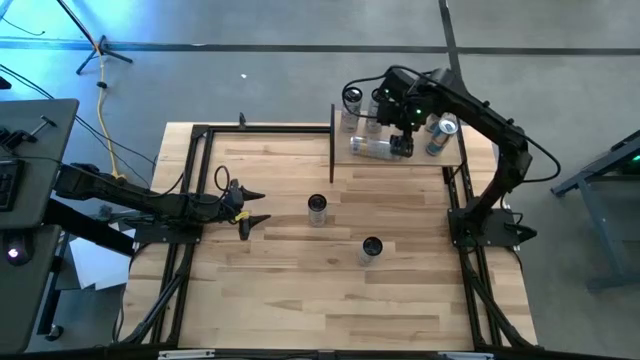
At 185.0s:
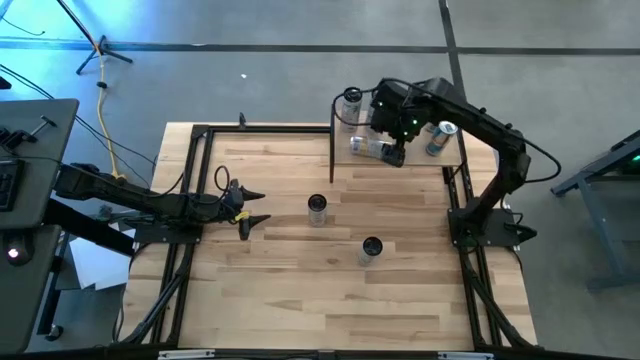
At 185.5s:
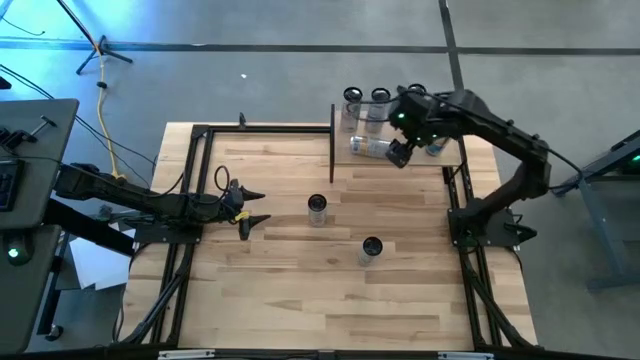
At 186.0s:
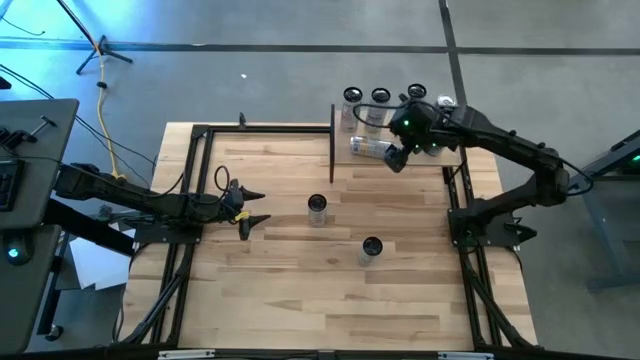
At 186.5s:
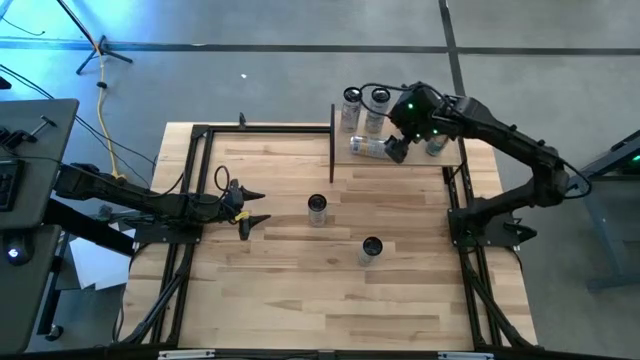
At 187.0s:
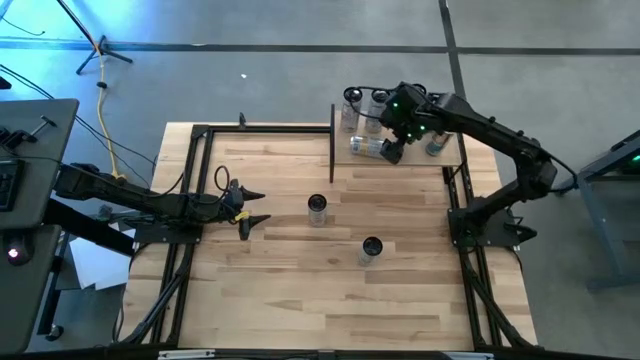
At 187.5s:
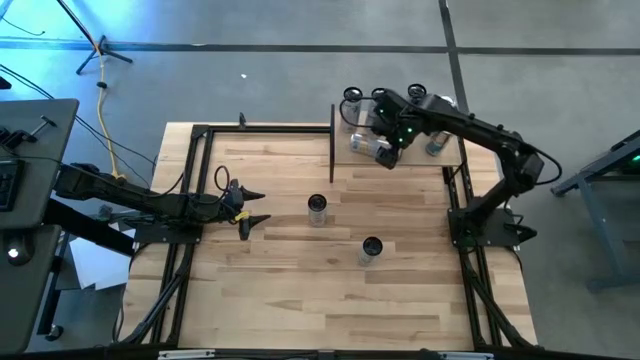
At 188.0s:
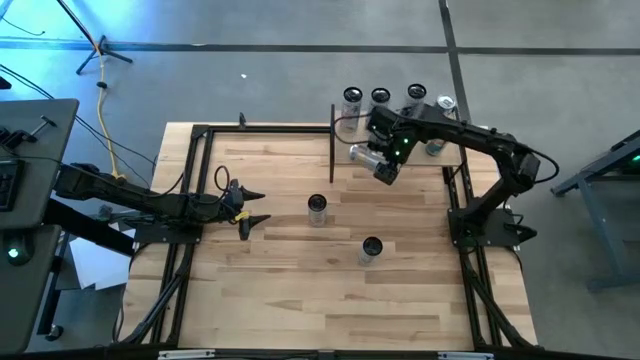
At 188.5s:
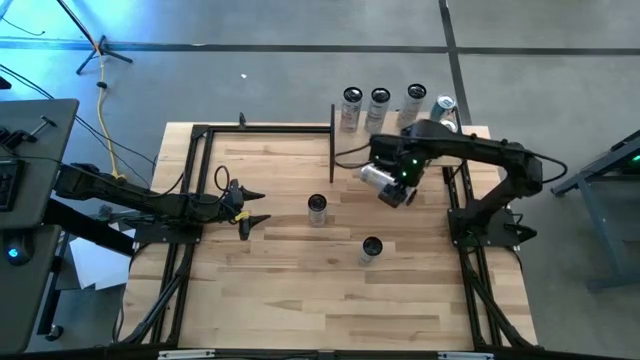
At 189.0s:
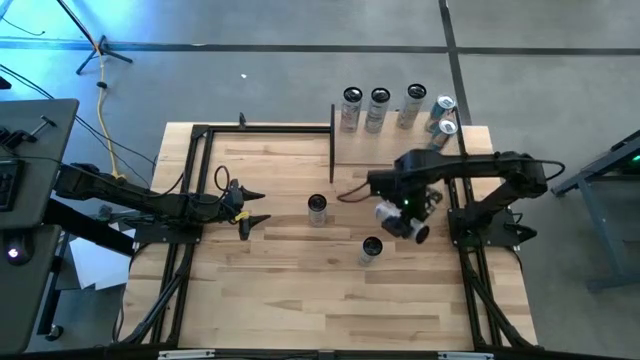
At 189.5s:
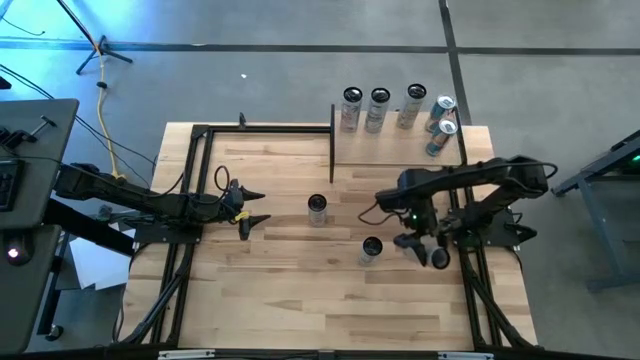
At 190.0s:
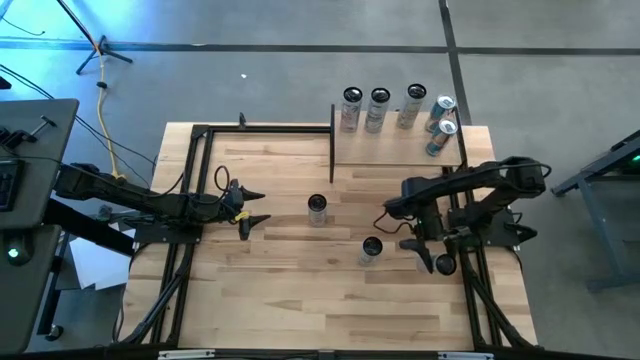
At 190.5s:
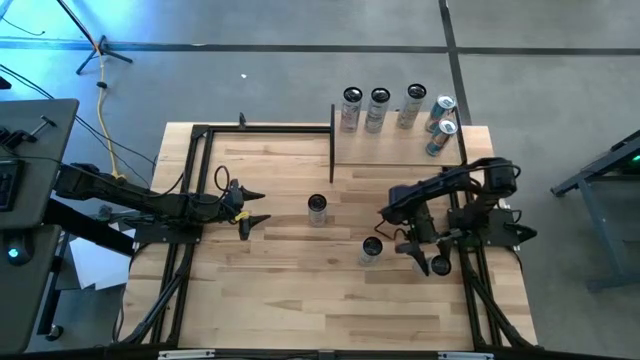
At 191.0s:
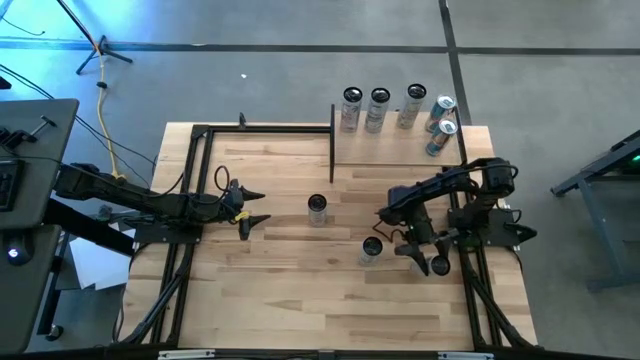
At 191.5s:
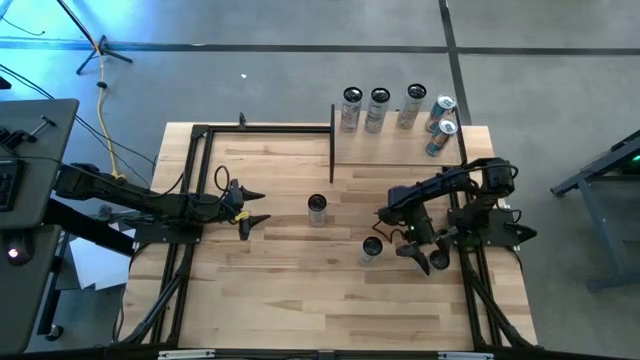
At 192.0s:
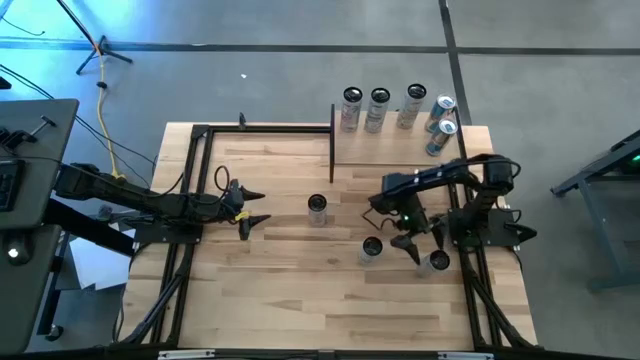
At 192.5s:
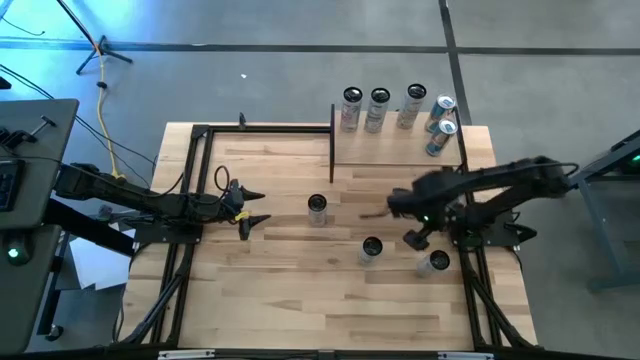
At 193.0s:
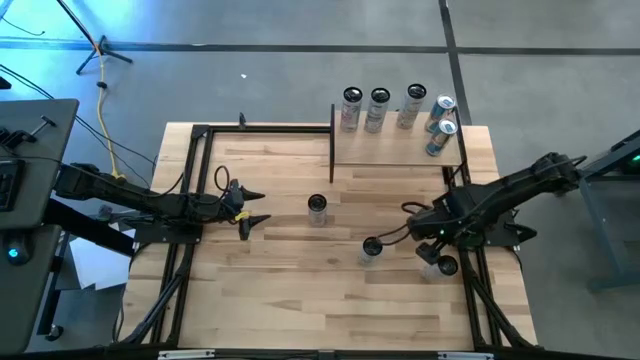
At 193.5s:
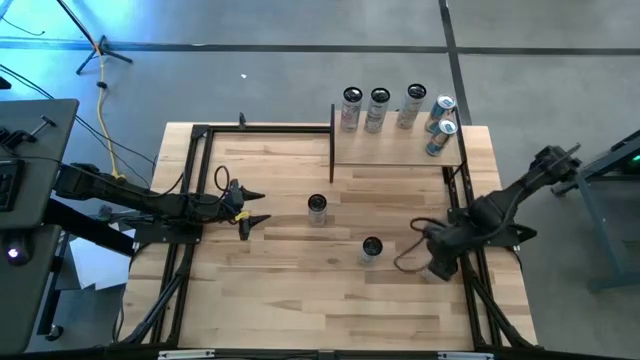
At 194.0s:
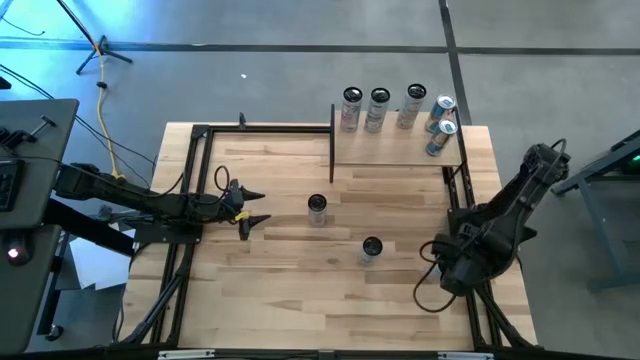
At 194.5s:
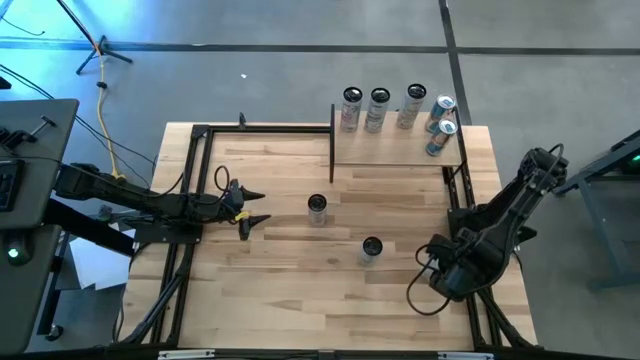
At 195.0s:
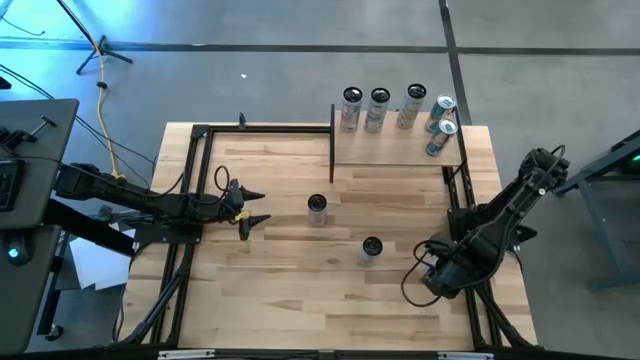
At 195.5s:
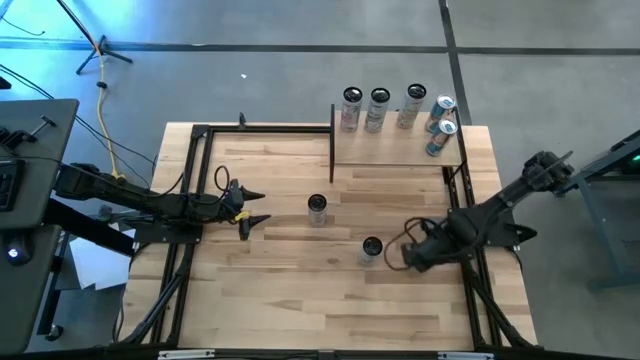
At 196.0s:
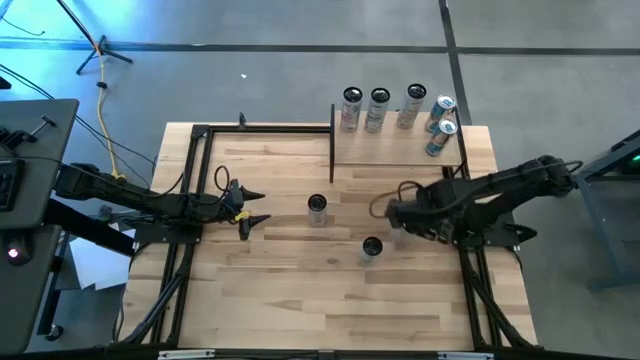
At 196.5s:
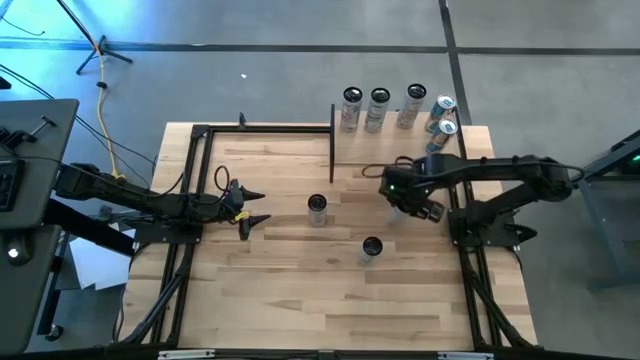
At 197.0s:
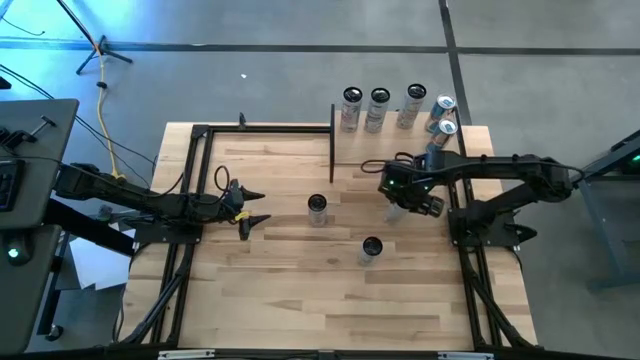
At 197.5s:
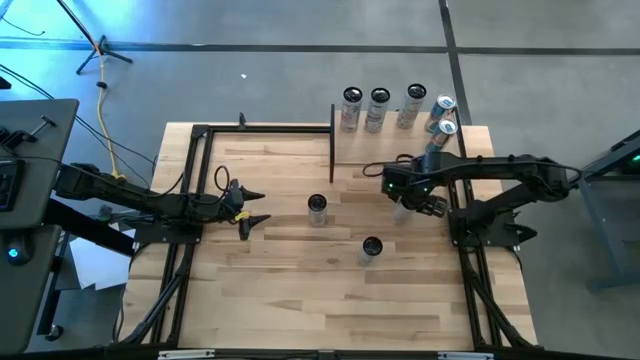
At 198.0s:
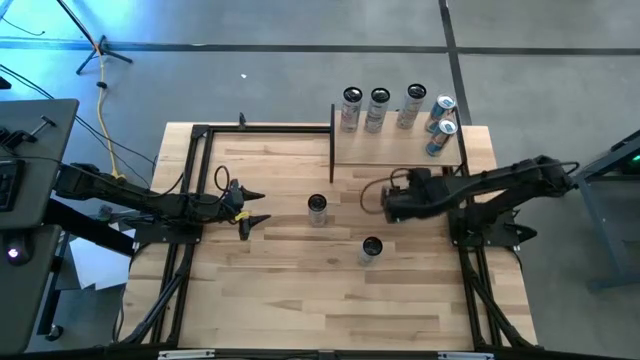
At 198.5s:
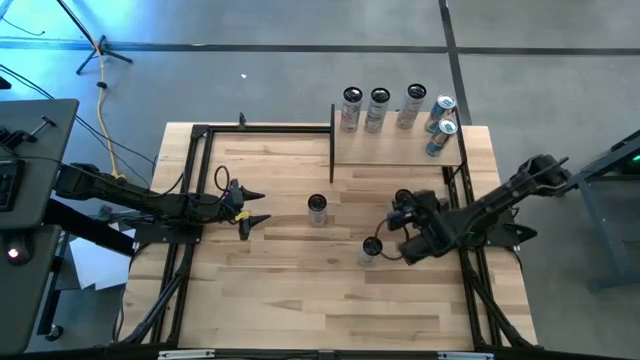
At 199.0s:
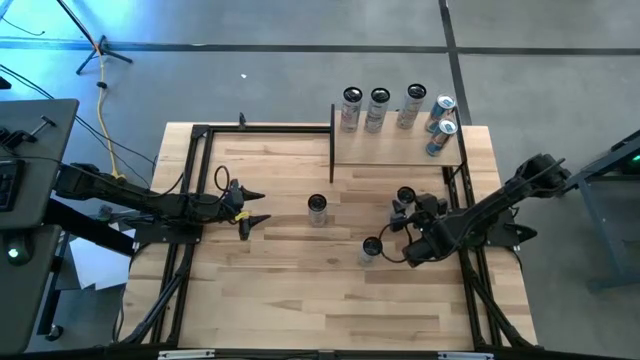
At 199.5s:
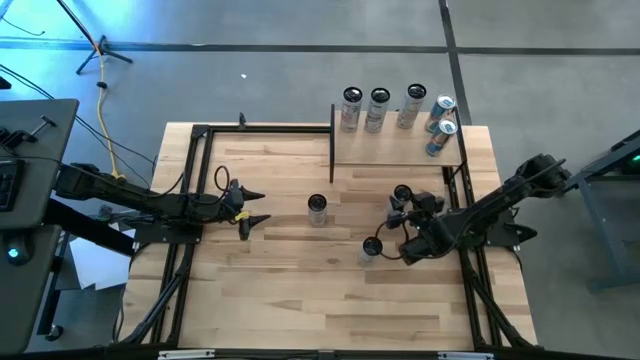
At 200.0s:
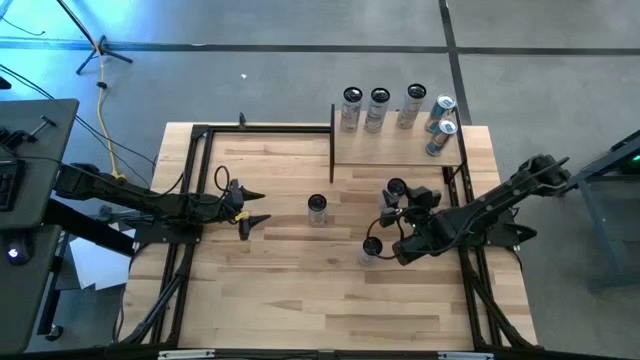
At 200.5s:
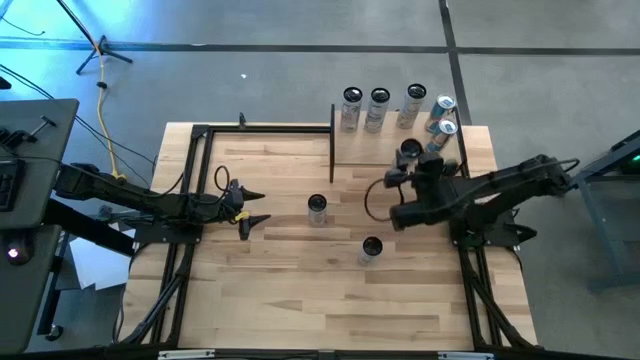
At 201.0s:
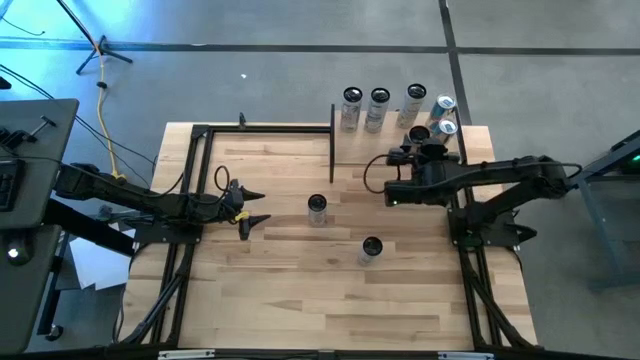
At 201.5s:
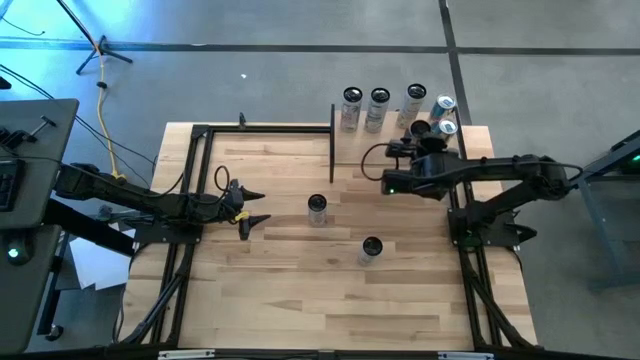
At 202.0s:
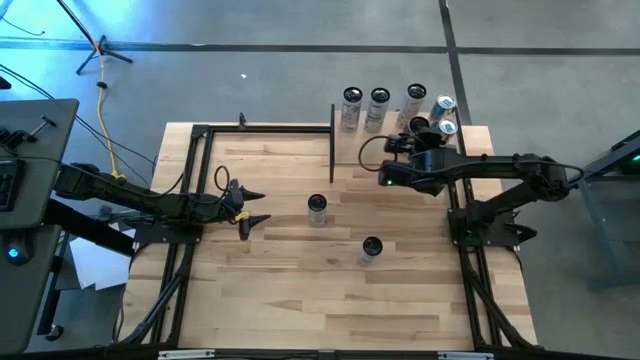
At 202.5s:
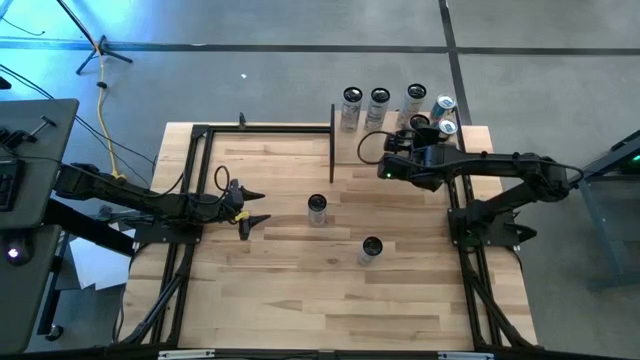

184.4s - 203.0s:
Task: Place canned beverage on shelf
Put the white yellow soda can on the shelf aligned with the white yellow soda can

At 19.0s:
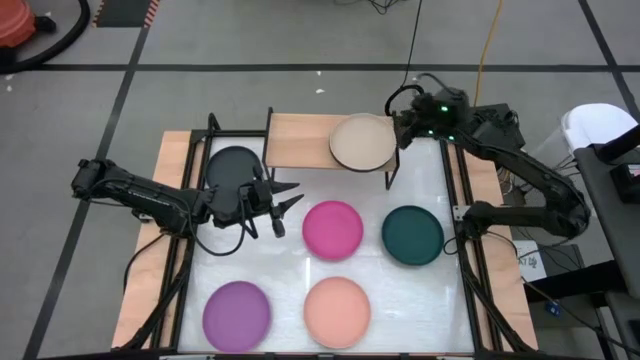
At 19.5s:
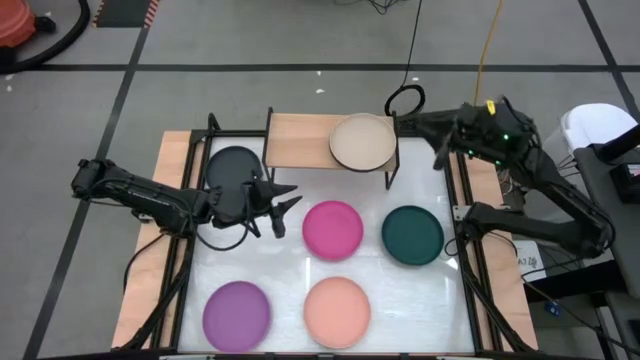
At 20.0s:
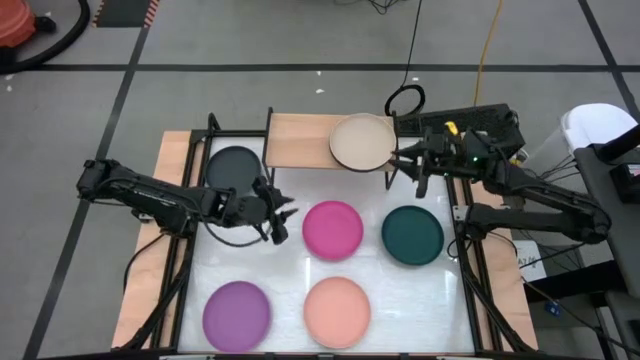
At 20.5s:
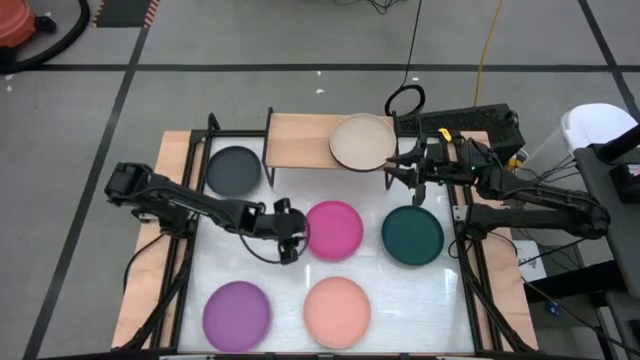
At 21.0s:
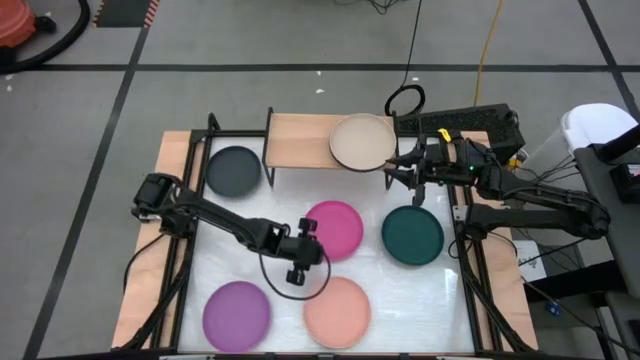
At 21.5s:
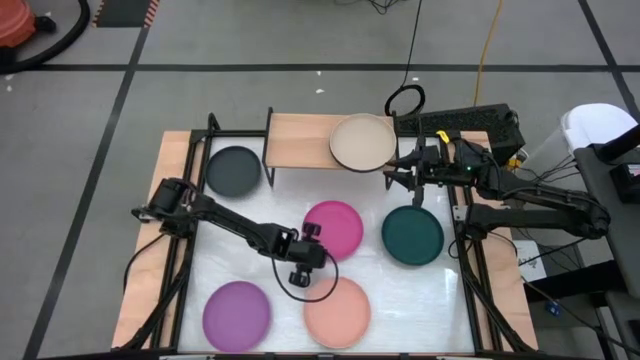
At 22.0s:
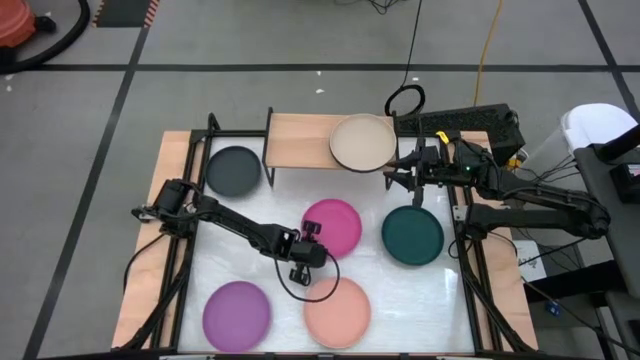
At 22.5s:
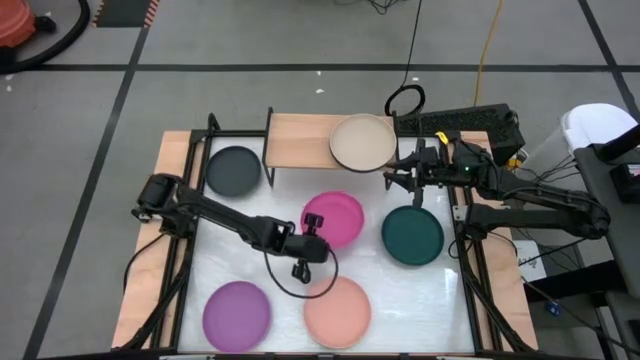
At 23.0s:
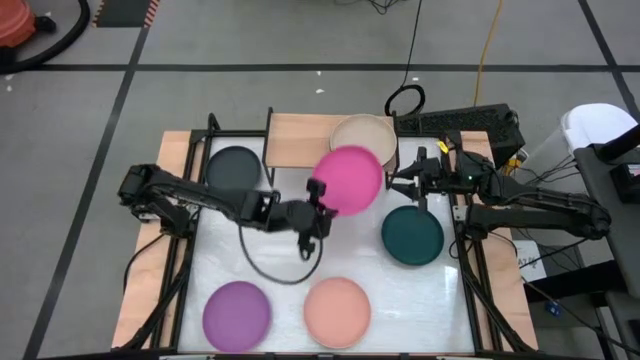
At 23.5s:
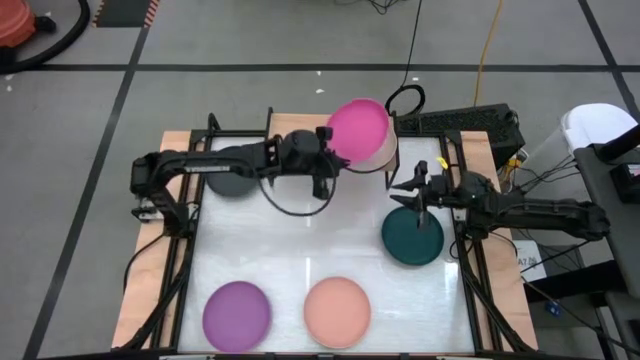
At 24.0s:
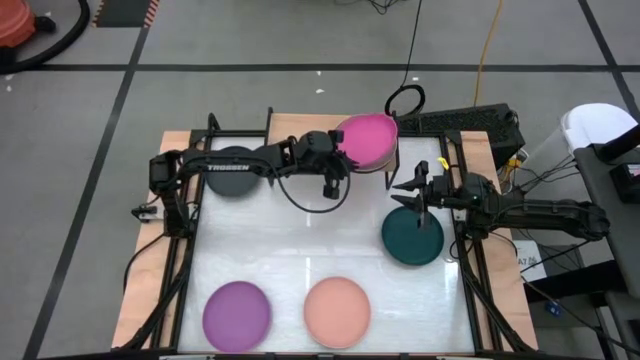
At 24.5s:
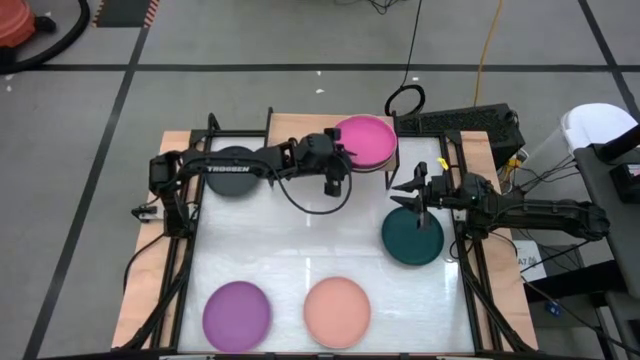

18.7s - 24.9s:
Task: Place and stack plates onto a shelf
Stack the pink plate on top of the brown plate on the shelf
